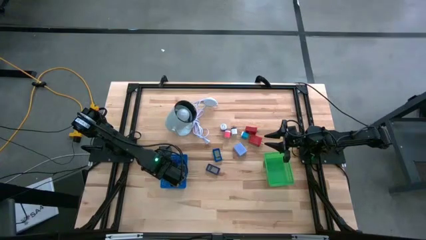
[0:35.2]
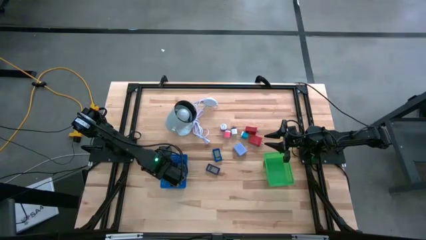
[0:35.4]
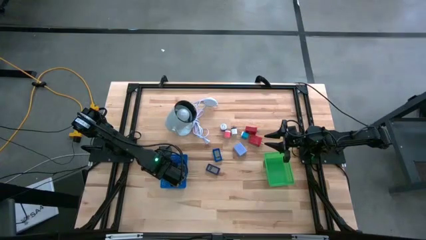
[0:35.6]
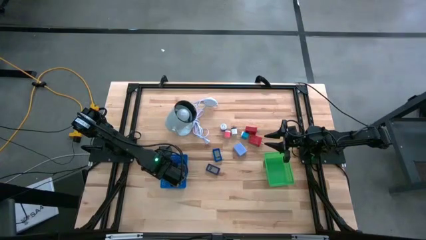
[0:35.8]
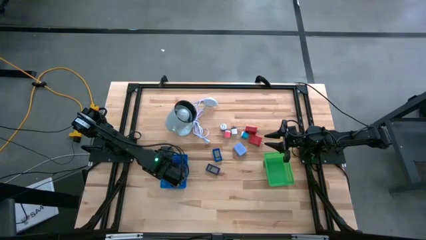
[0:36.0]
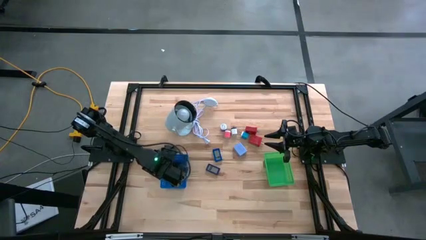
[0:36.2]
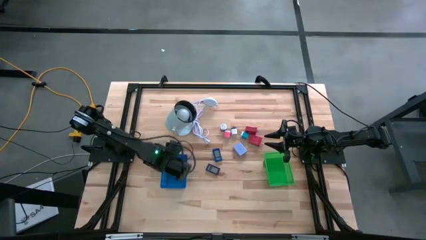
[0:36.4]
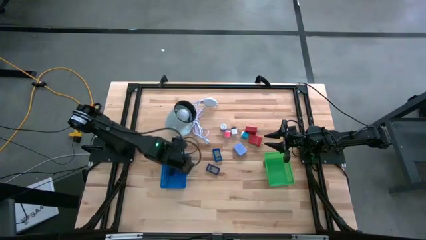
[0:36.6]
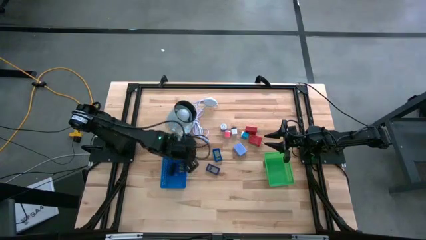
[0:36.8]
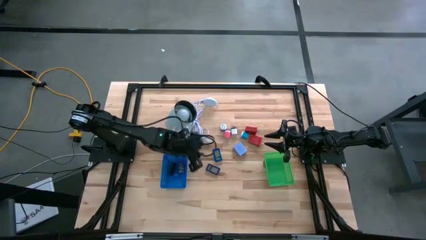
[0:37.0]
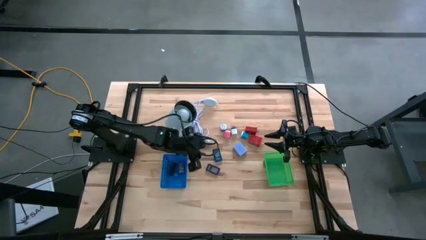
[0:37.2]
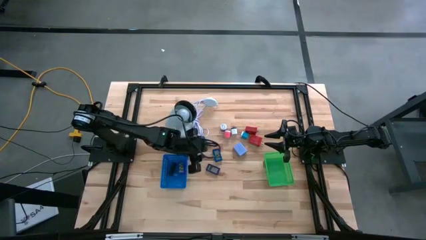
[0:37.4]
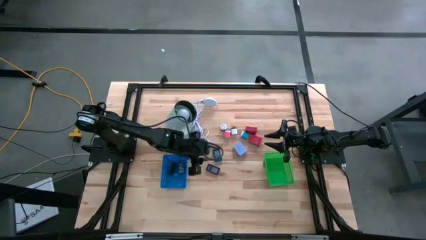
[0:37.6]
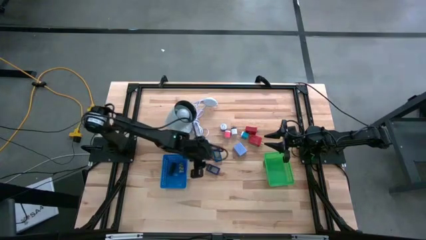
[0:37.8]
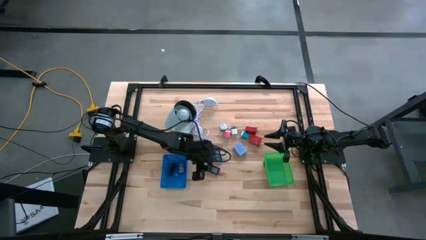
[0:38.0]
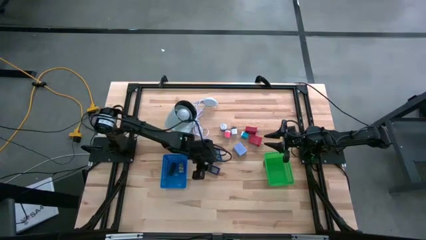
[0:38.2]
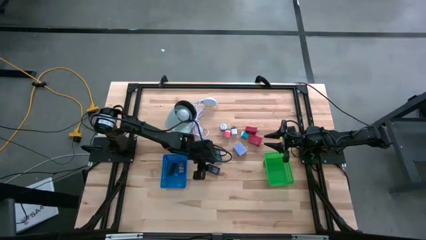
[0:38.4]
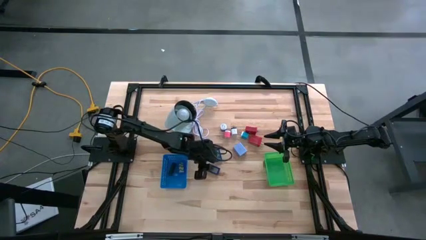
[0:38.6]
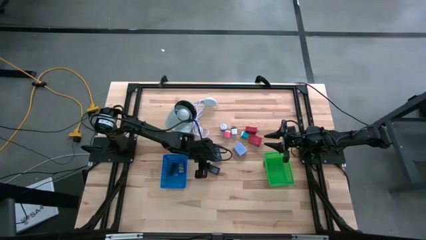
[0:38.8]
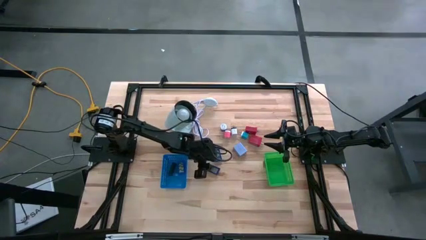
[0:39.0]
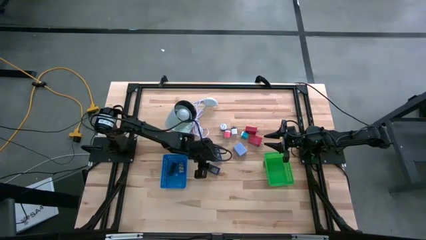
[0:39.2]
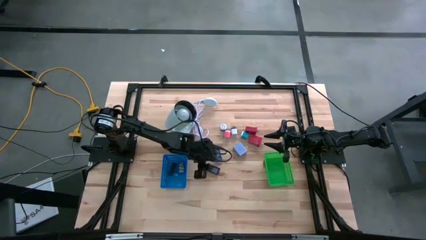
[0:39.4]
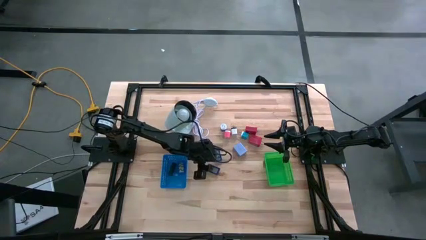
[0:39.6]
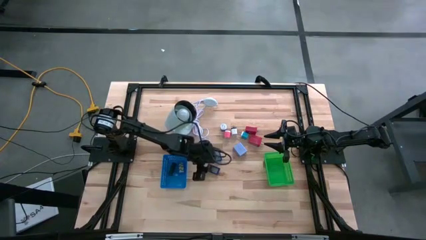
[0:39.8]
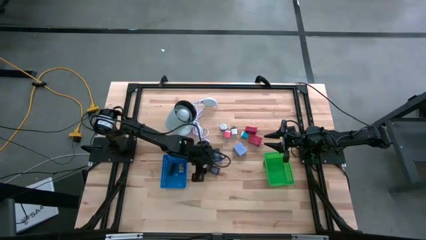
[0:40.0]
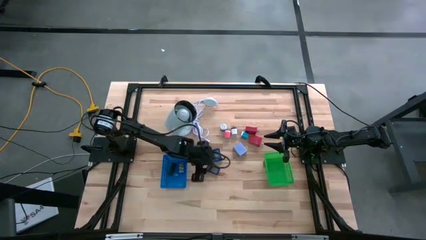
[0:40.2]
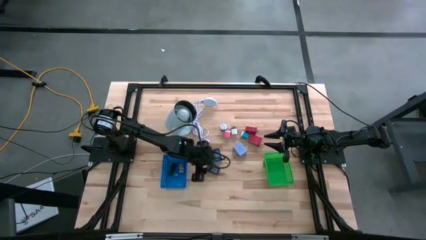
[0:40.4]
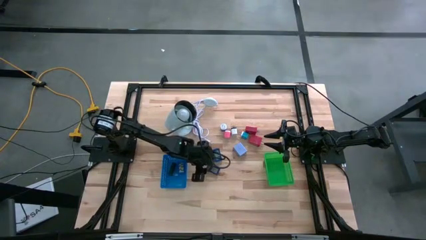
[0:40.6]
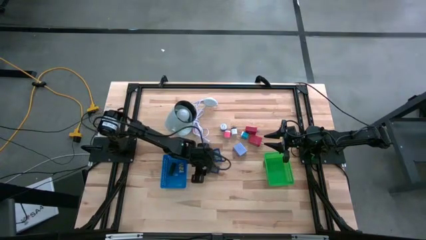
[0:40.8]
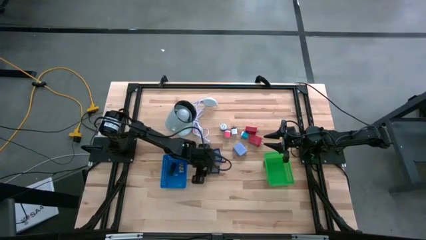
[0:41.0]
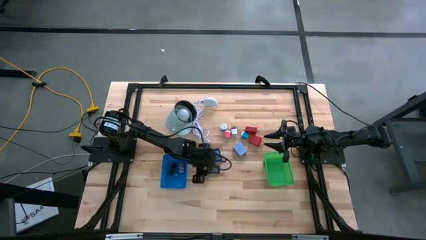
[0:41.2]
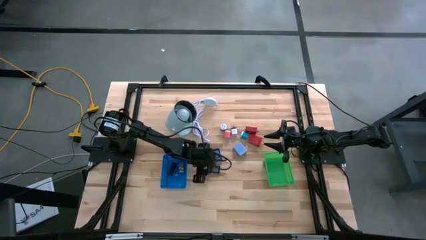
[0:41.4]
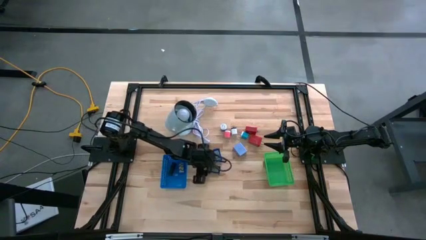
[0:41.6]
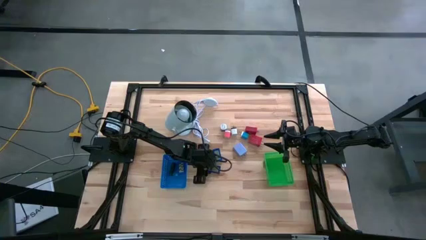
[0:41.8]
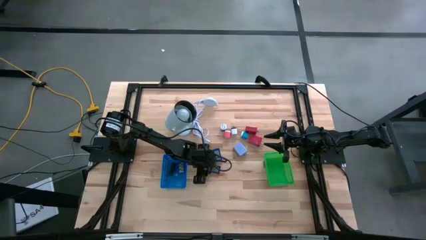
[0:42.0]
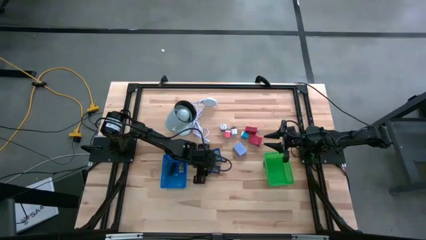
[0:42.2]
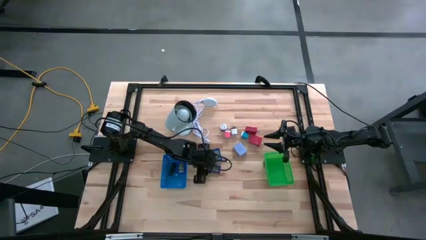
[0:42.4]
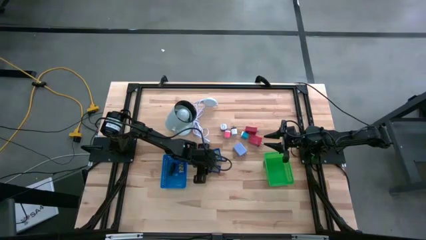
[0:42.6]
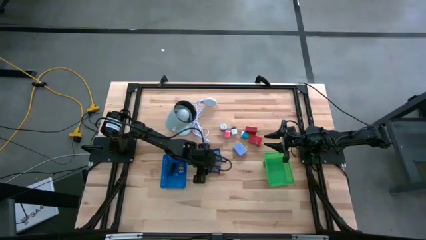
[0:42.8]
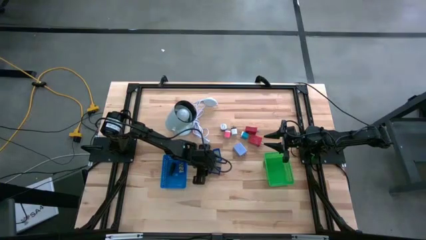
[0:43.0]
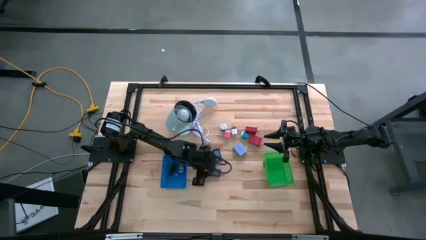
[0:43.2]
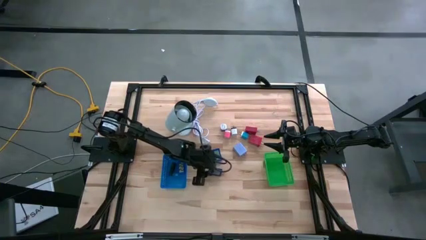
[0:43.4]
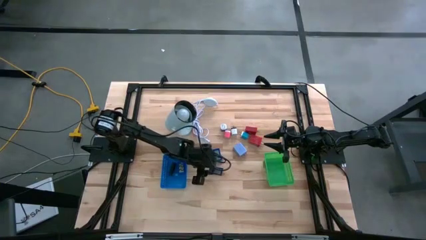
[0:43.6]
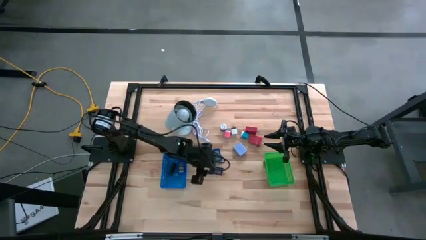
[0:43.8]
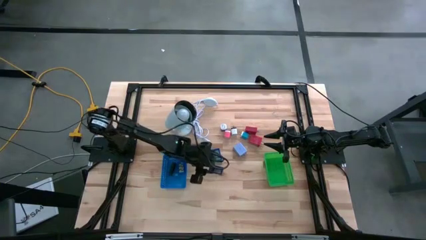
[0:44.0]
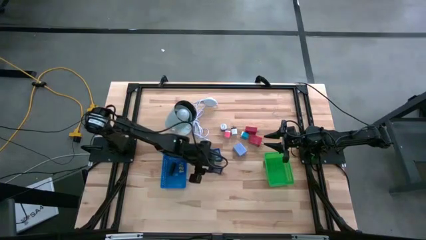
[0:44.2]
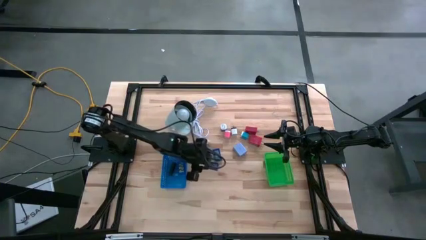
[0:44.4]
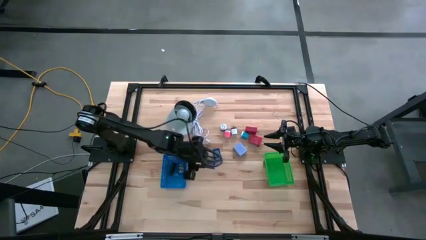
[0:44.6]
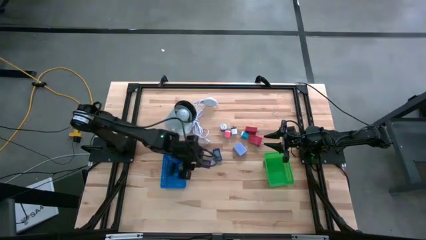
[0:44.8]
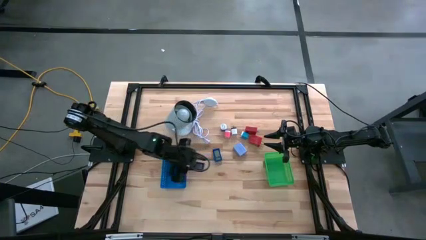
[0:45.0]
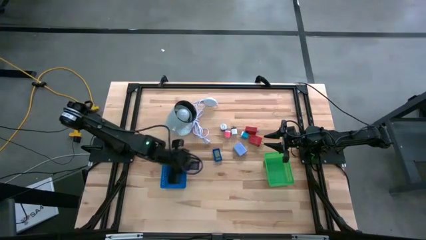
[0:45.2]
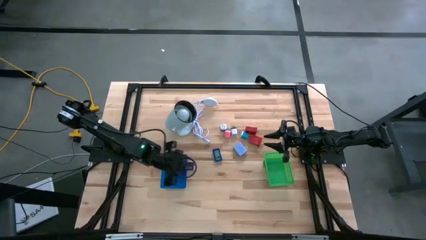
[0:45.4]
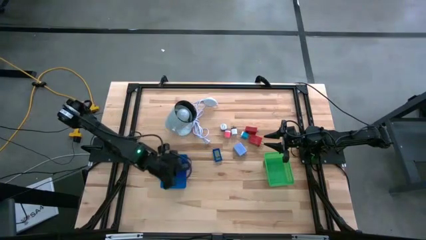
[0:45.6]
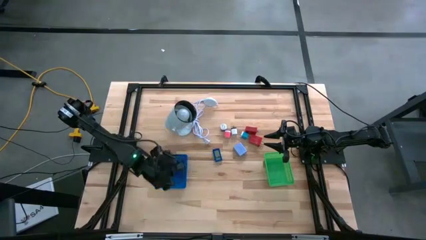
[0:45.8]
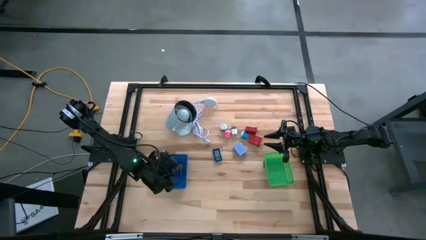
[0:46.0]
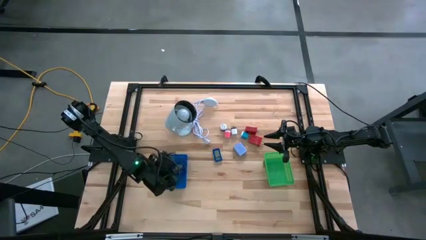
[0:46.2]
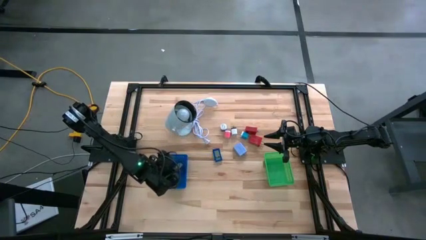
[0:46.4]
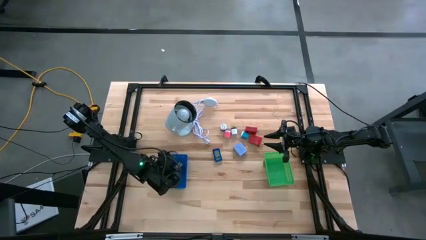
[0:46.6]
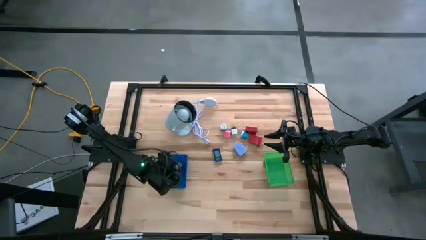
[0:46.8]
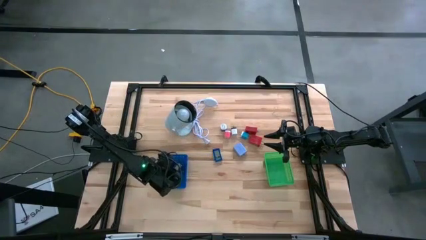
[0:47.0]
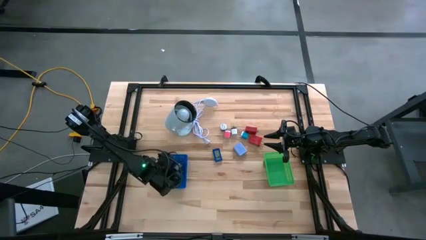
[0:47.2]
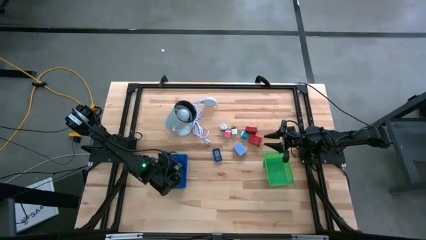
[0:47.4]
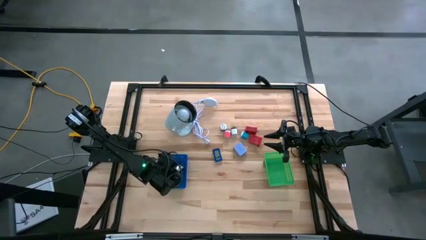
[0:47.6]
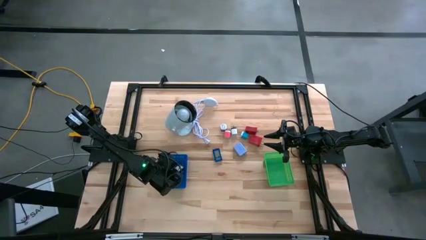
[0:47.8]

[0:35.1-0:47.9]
Task: Pick & Place Office items
Put the blue digital timer into the blue bin

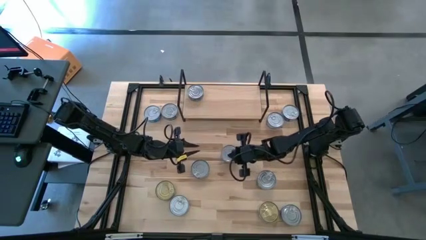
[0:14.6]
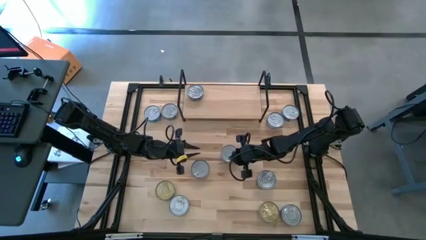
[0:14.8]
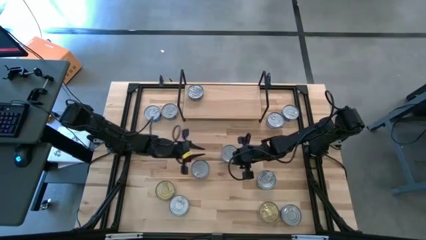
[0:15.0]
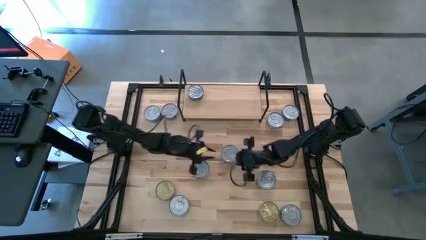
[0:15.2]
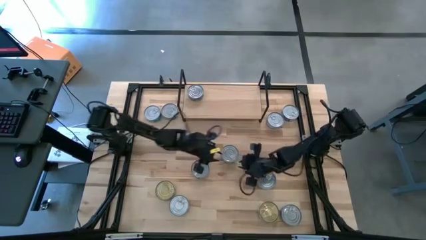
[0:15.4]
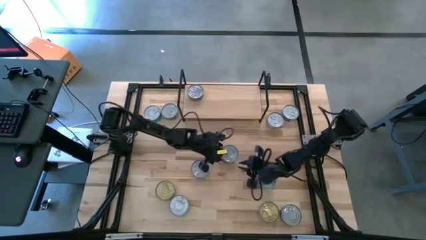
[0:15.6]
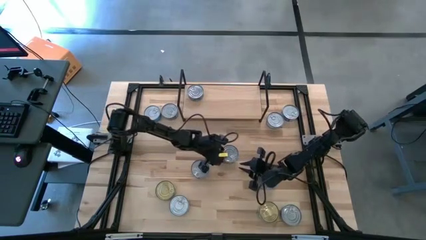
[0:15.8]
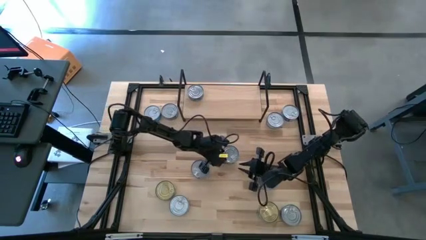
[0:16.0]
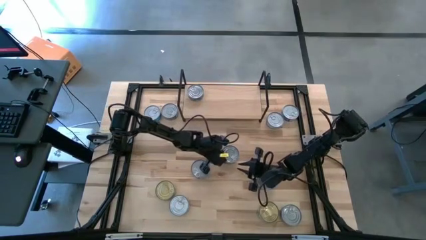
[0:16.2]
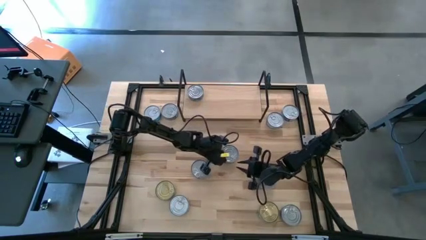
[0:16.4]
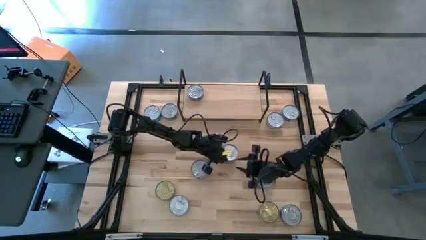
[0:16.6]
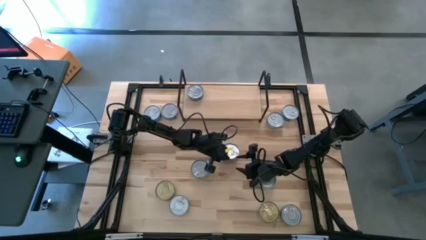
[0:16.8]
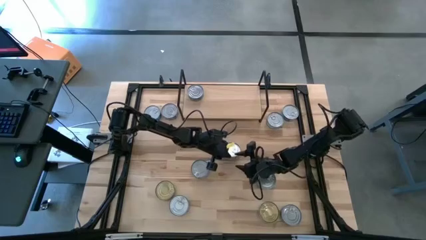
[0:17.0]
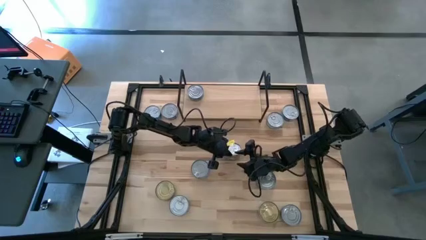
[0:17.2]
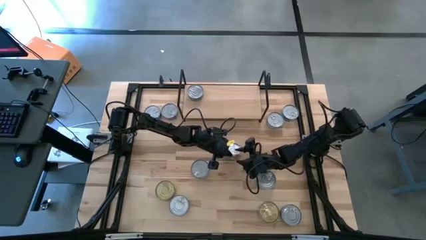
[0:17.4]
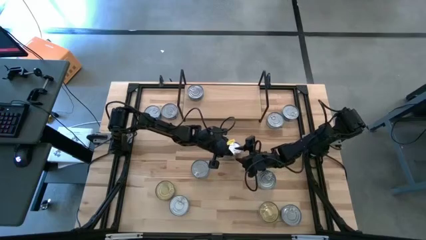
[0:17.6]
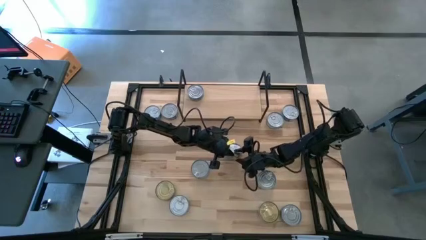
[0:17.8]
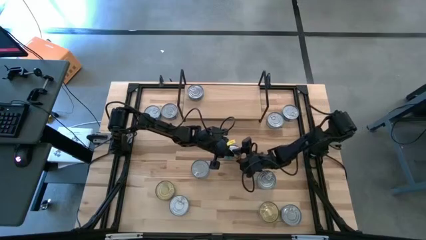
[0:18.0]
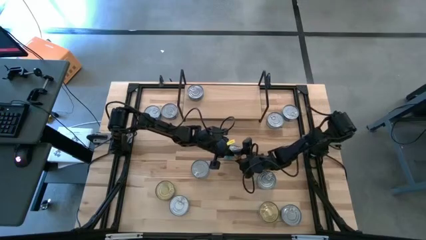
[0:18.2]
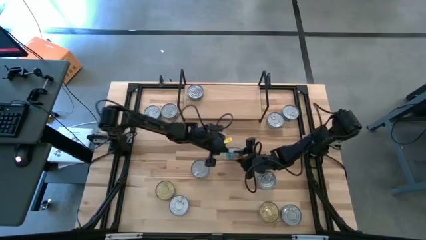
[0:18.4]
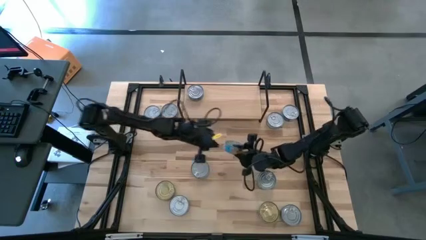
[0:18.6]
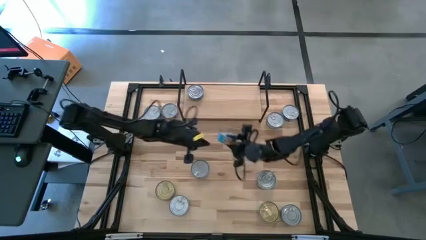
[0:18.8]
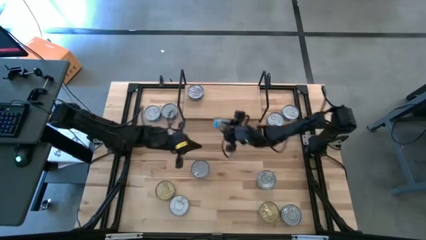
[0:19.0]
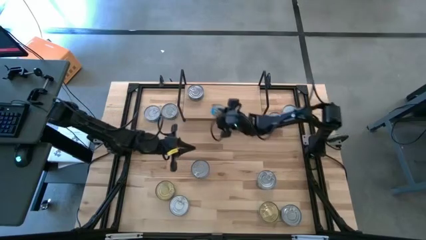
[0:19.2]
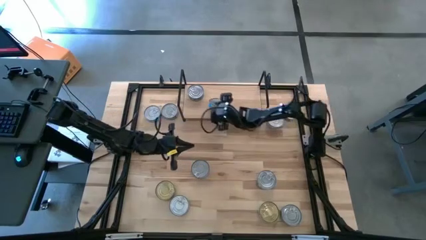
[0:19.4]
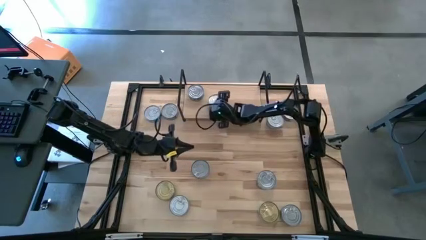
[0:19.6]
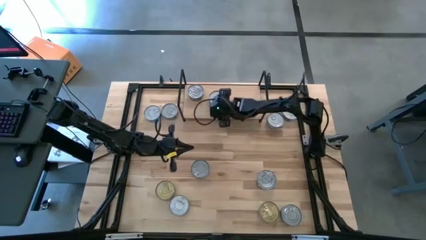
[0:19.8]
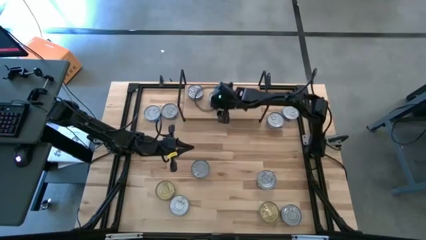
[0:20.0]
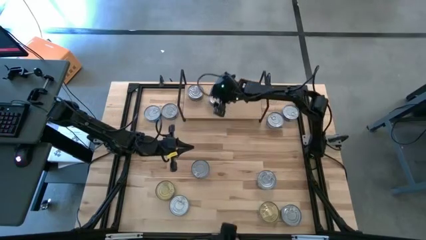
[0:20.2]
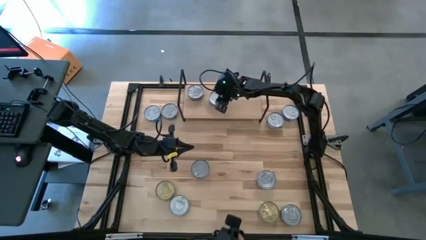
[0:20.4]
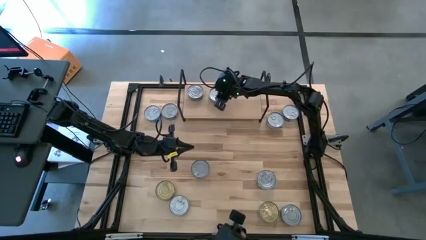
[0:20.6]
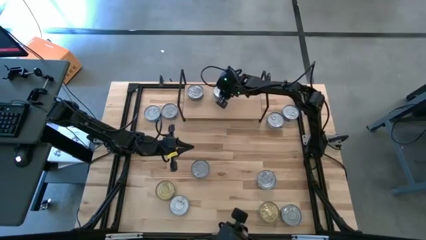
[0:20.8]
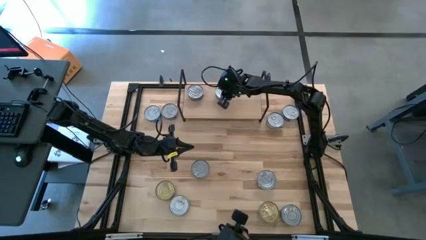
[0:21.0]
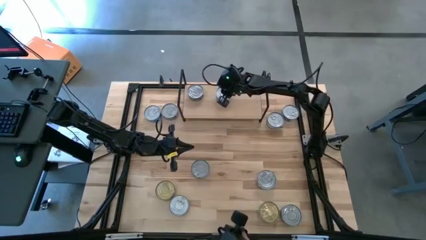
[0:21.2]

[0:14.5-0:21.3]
Task: Stack canned seafood by type on shelf
Put the yellow and blue tuna can on the shelf
